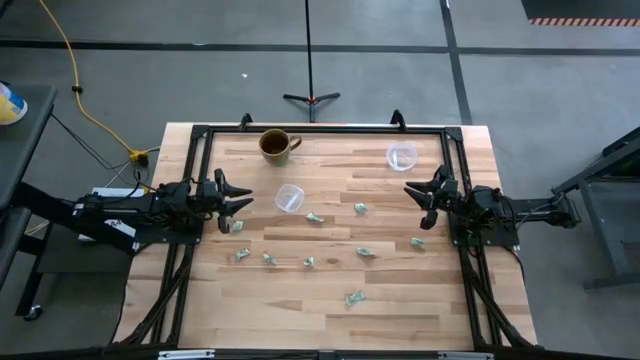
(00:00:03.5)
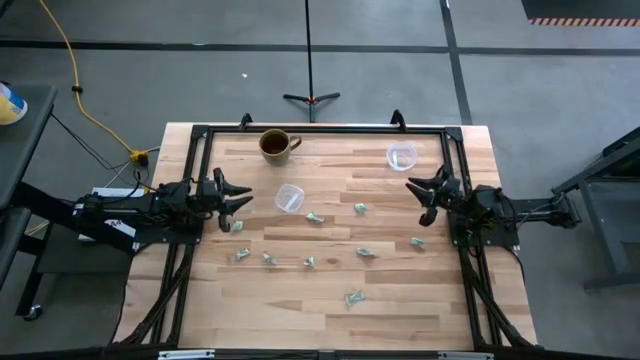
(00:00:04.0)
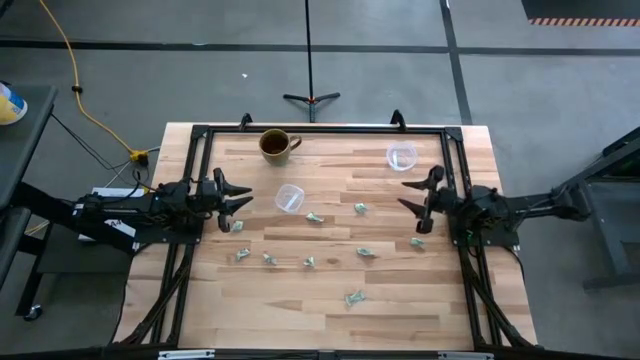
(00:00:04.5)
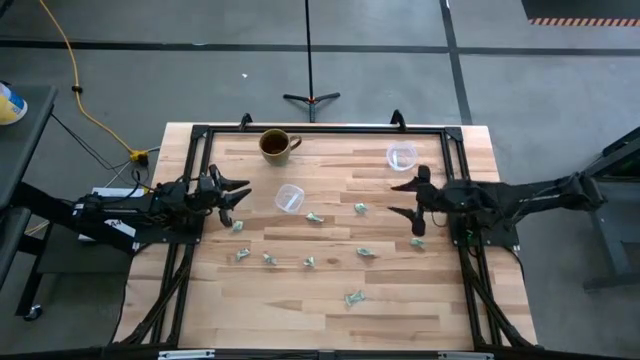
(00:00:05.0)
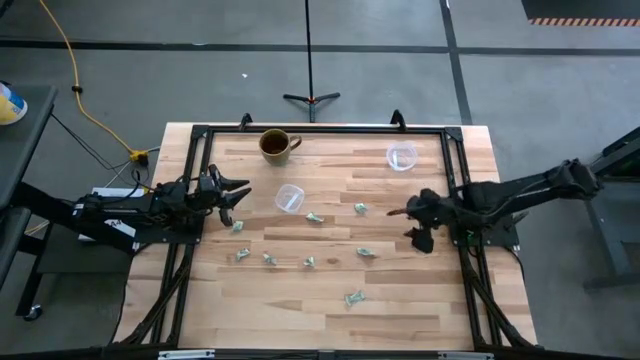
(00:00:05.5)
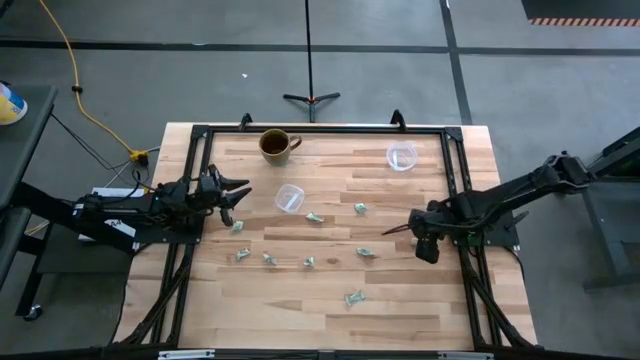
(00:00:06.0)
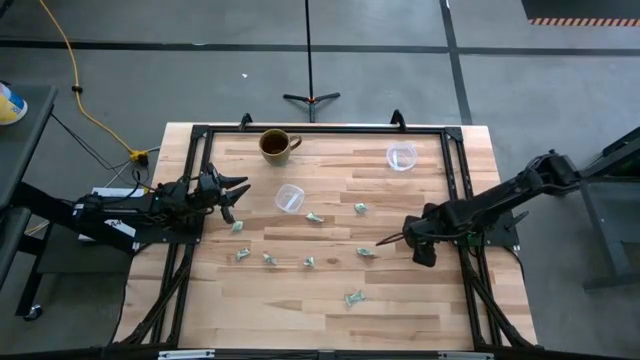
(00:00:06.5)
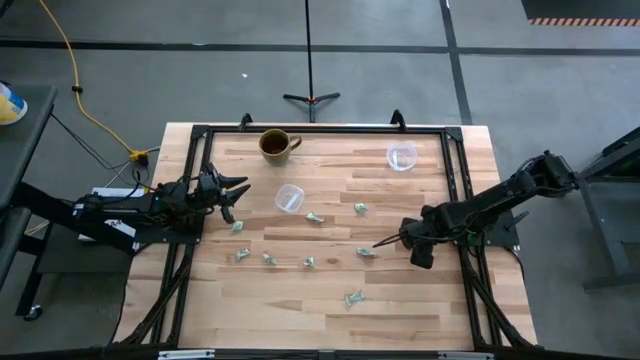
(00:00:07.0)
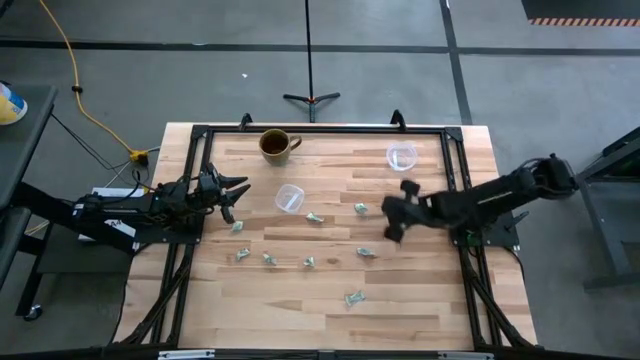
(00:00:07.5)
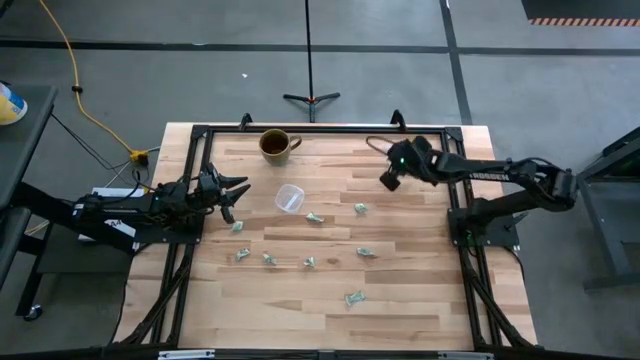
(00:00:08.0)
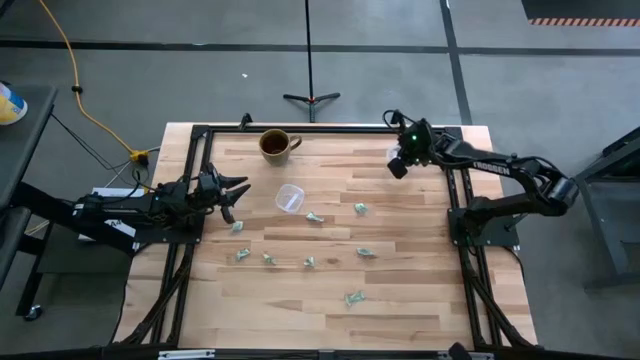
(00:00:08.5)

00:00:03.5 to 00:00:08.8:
Task: Pick and place Stevia / Truvia into bins
Put the white stevia packet into the right transparent container

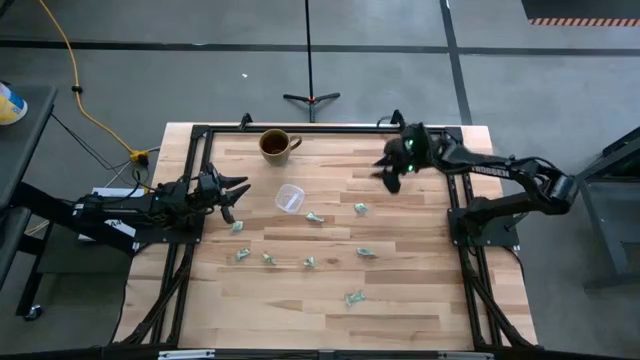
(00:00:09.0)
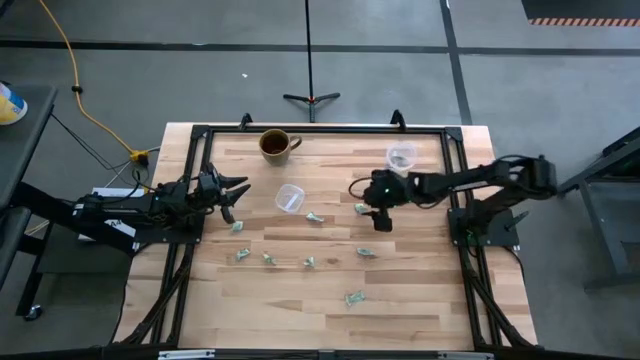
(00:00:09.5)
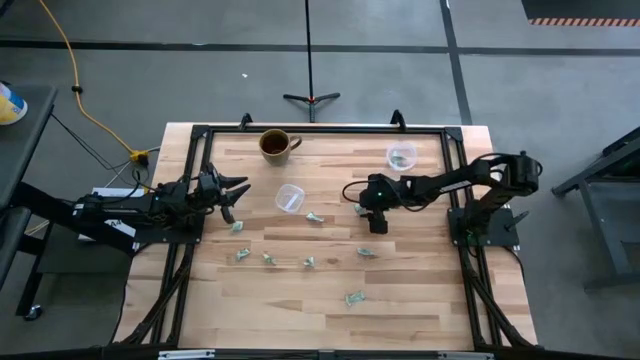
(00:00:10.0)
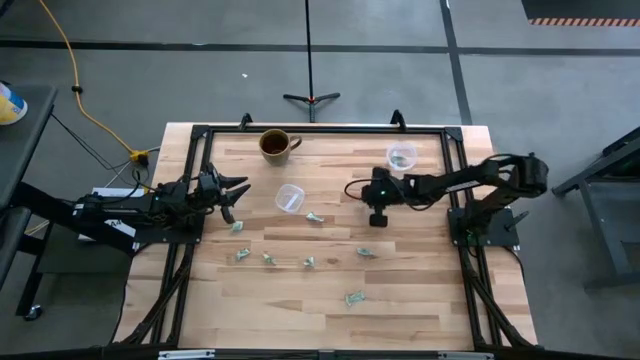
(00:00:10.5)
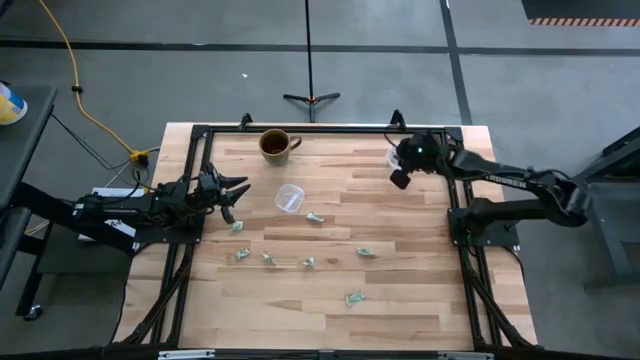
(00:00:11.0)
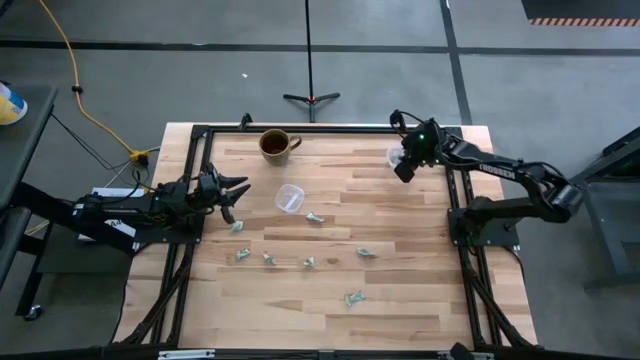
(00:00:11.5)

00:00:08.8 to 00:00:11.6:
Put the white stevia packet into the right transparent container

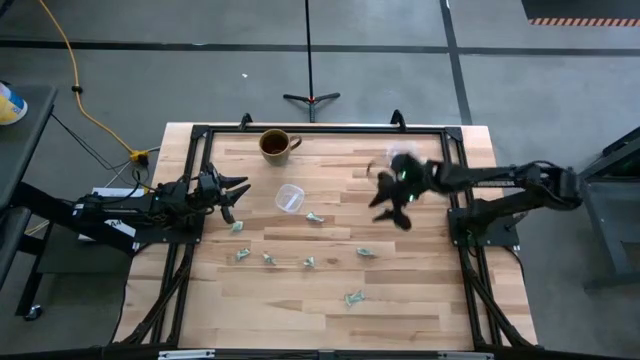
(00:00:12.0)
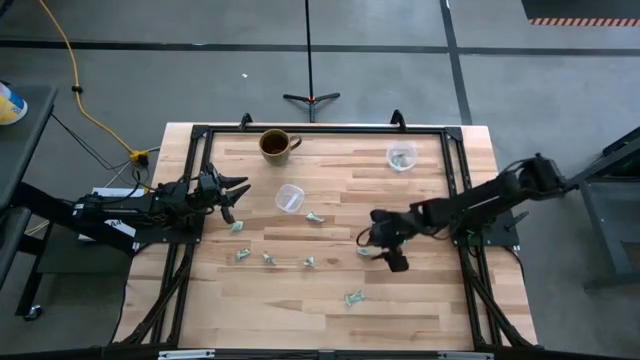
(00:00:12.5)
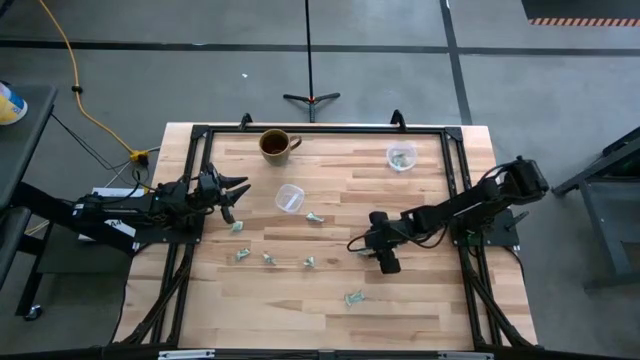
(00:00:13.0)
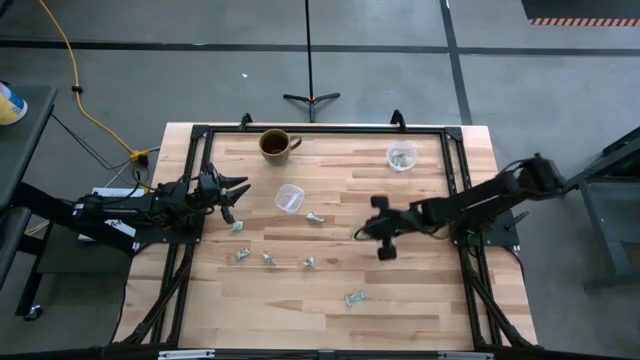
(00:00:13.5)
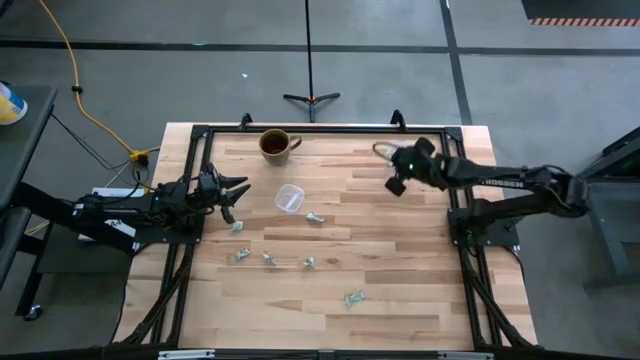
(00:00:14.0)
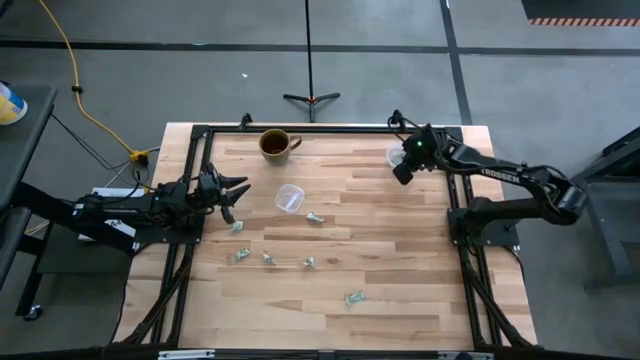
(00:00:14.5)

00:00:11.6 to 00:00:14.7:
Put the white stevia packet into the right transparent container

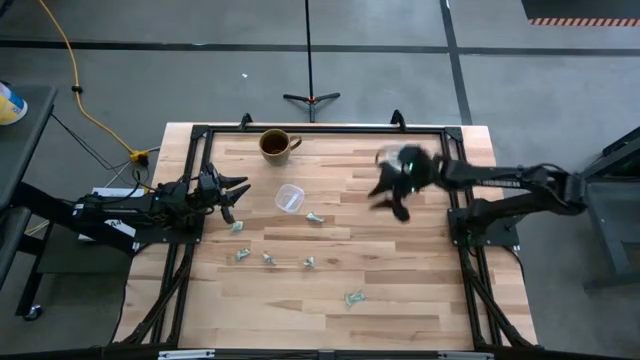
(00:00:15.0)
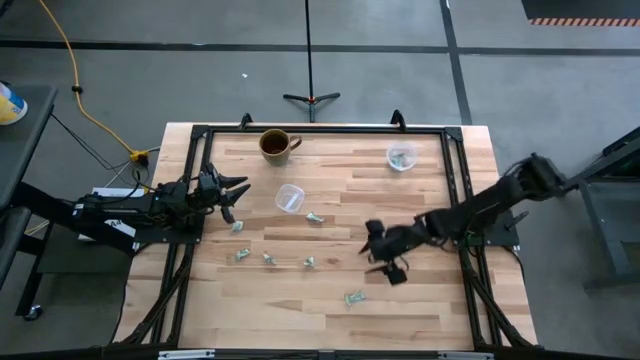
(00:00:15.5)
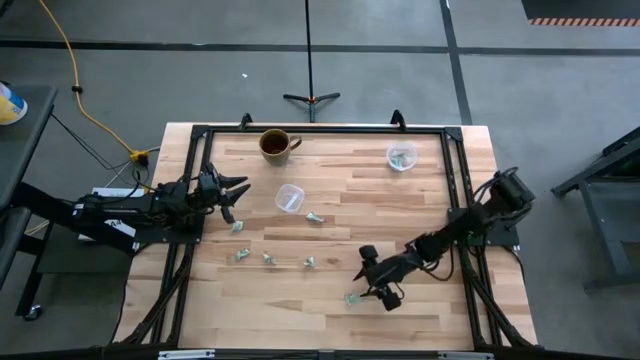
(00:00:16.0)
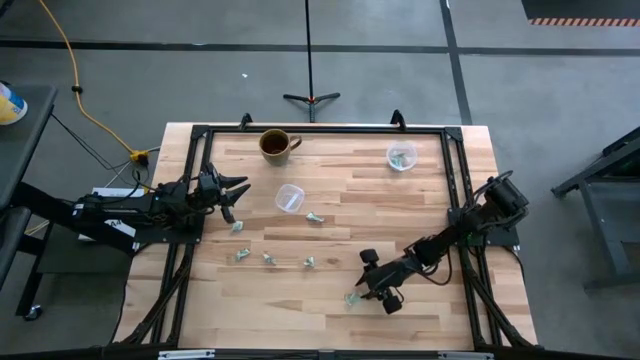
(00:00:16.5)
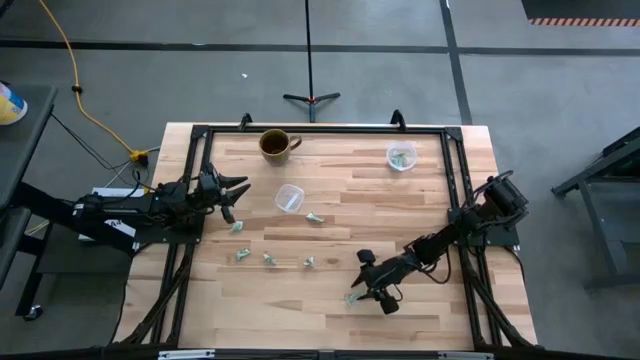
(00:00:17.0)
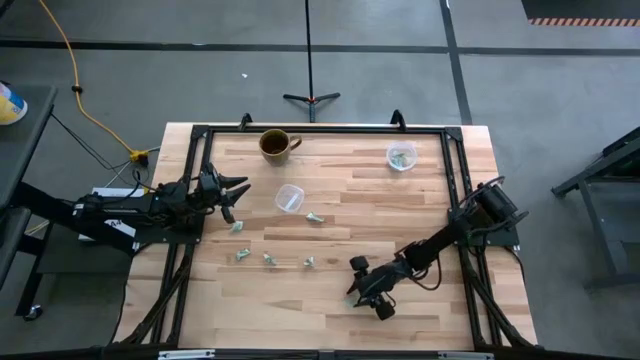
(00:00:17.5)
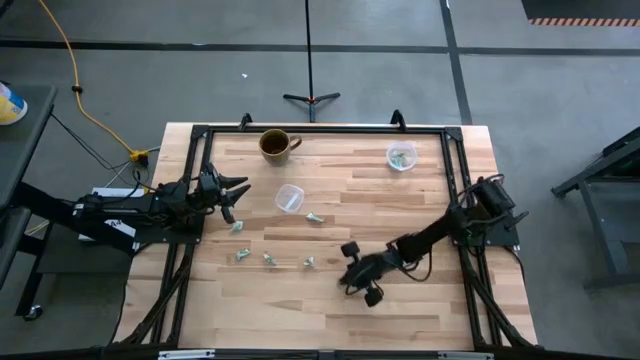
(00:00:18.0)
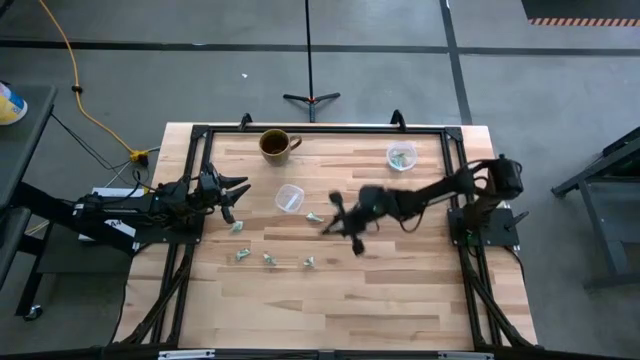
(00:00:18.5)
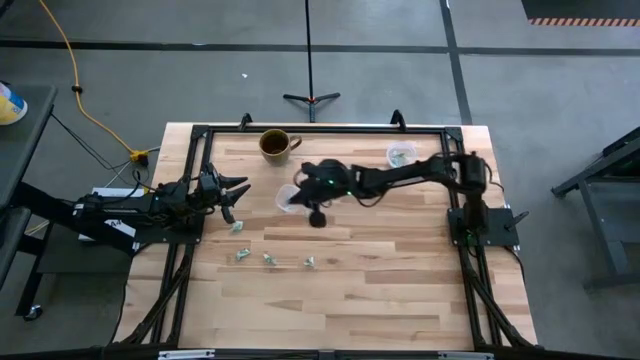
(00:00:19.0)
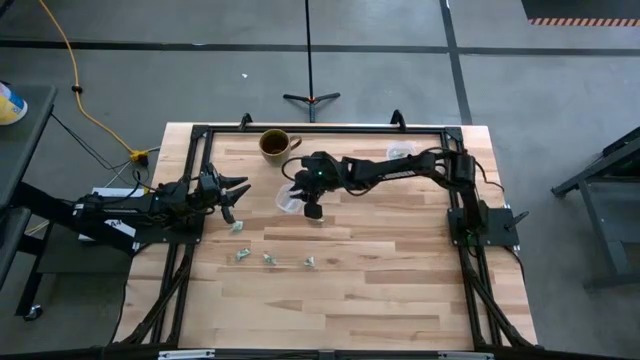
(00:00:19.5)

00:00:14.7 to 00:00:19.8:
Put the white stevia packet into the left transparent container

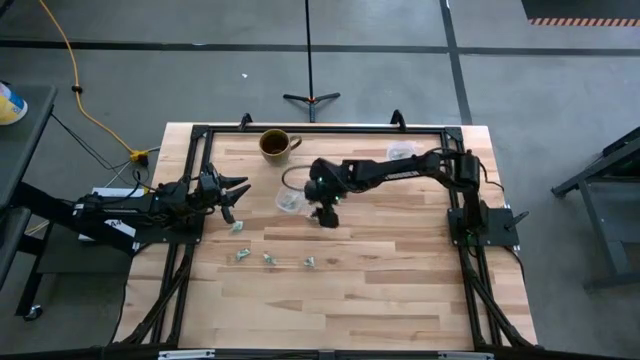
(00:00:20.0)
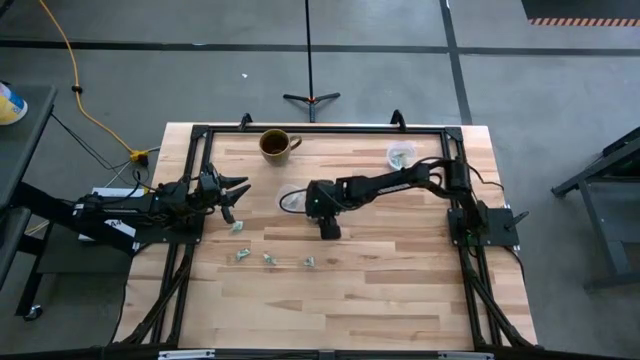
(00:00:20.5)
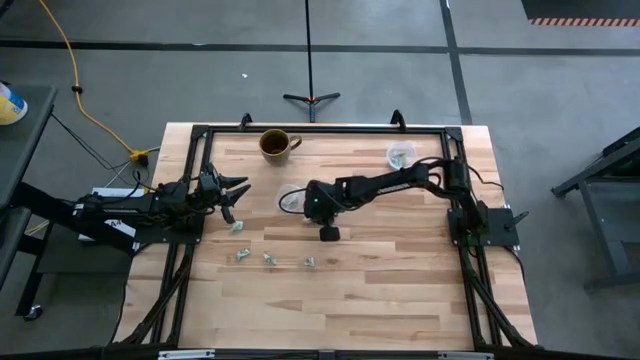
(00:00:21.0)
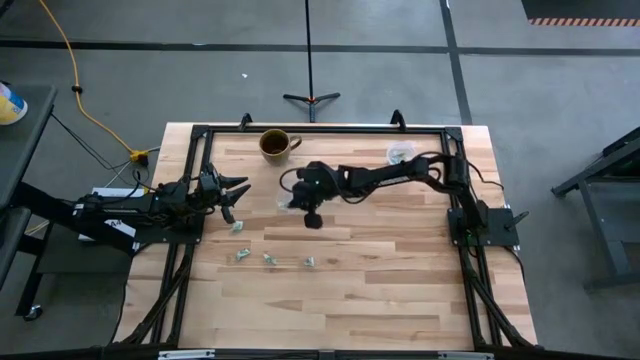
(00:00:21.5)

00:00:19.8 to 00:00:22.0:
Put the white stevia packet into the left transparent container

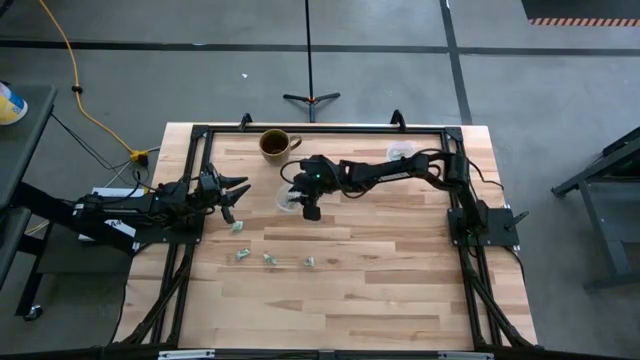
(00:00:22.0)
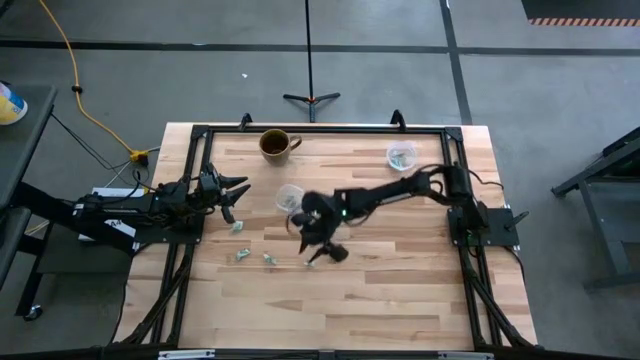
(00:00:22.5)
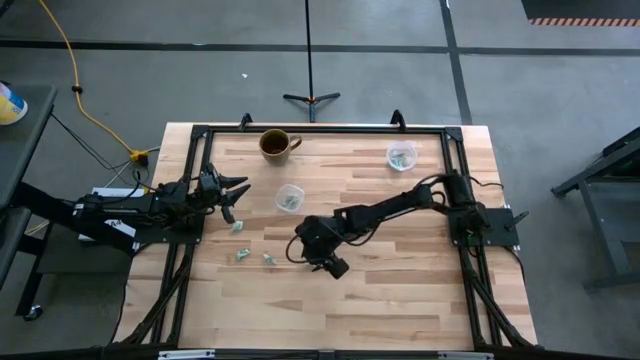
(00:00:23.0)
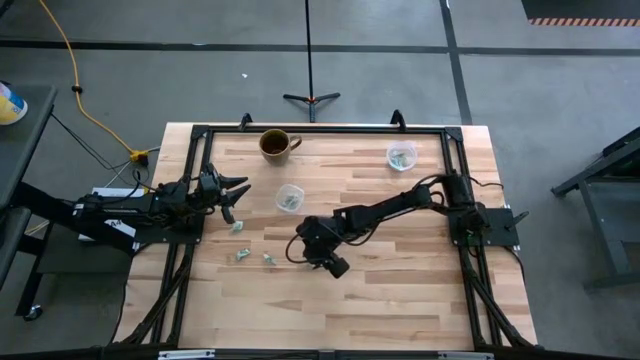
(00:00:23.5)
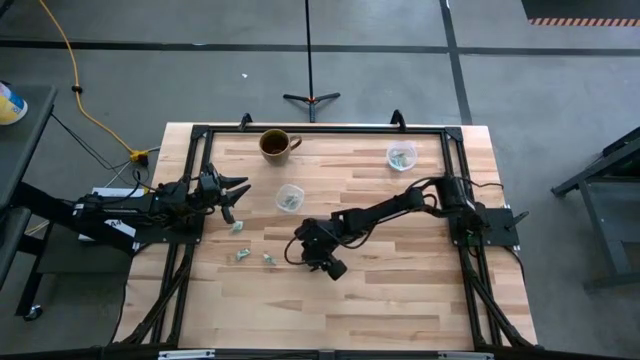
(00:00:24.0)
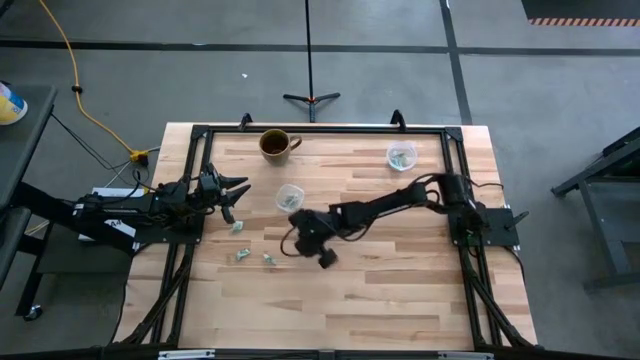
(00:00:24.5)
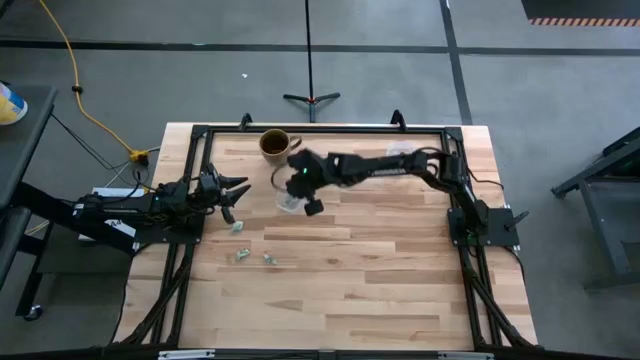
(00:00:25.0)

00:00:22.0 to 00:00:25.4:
Put the white stevia packet into the left transparent container
